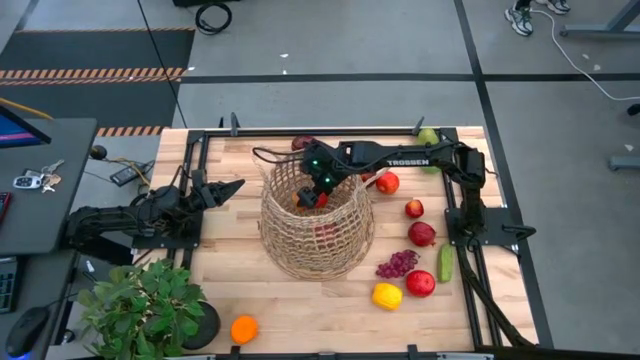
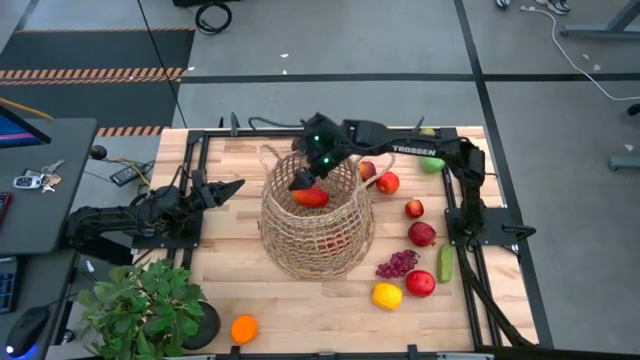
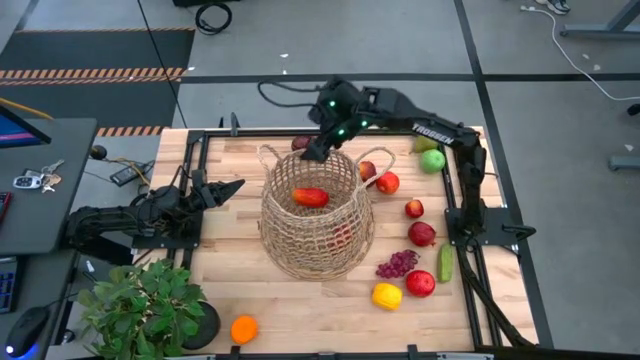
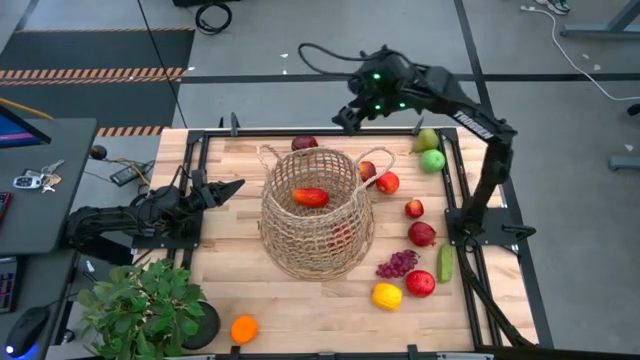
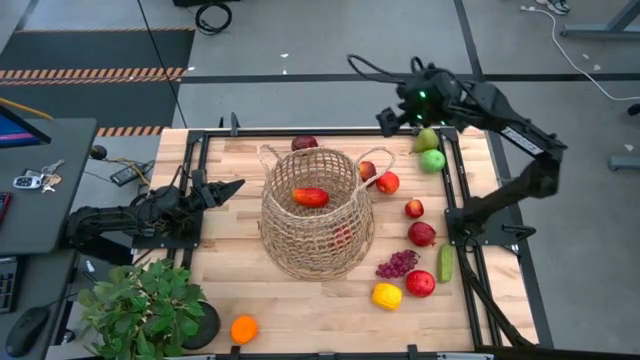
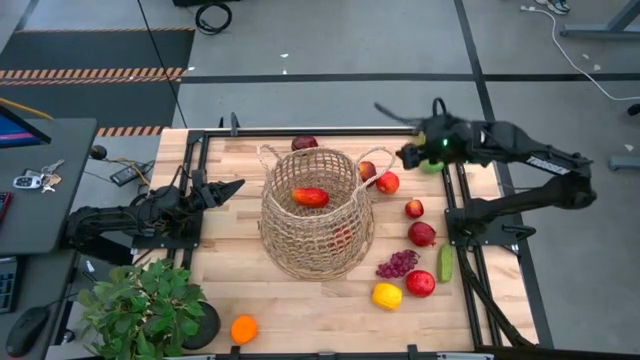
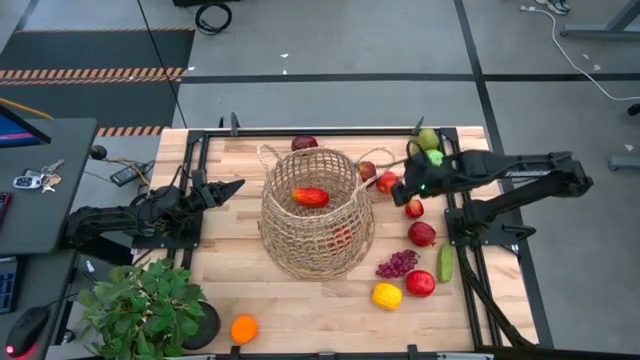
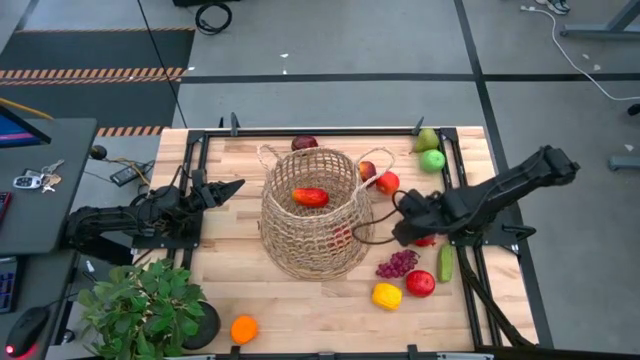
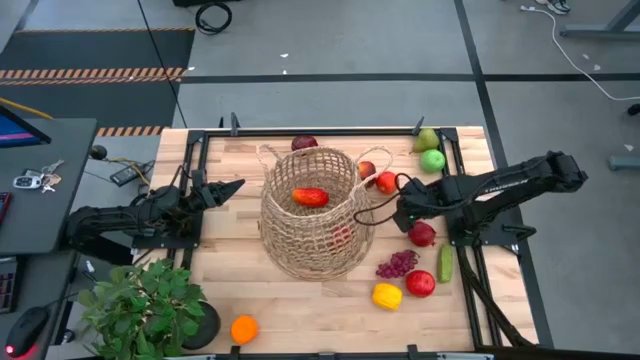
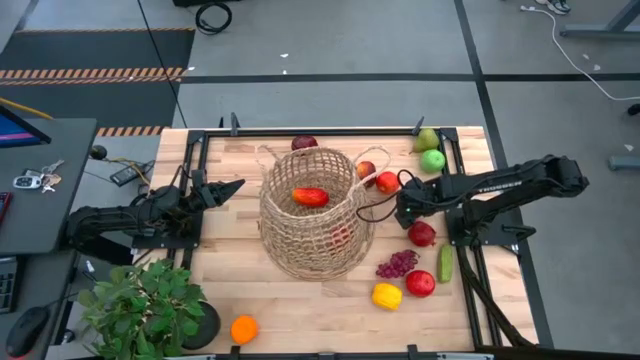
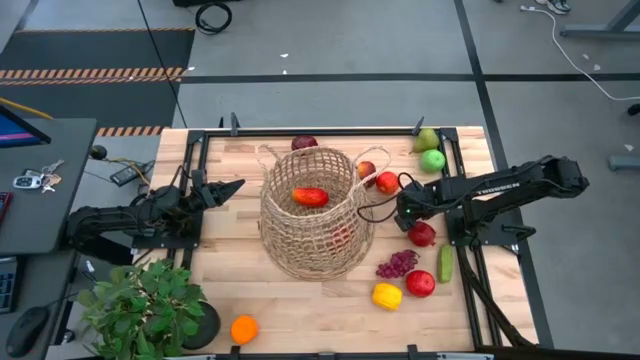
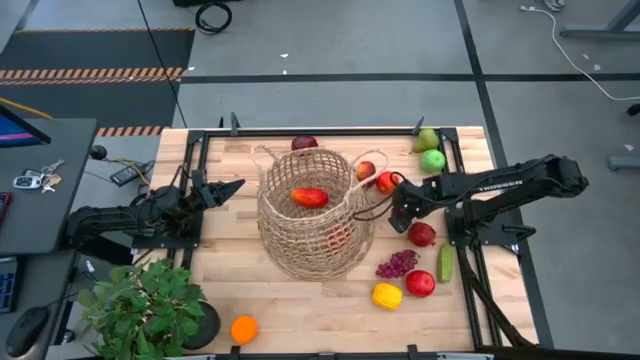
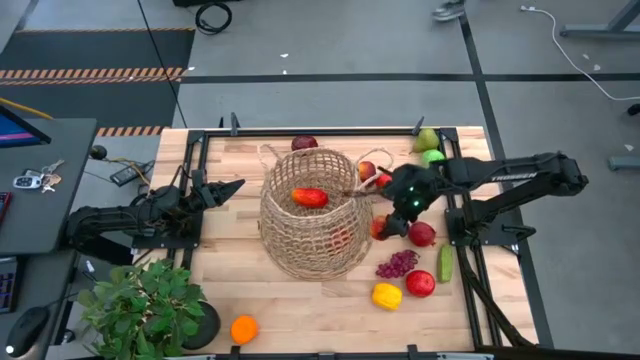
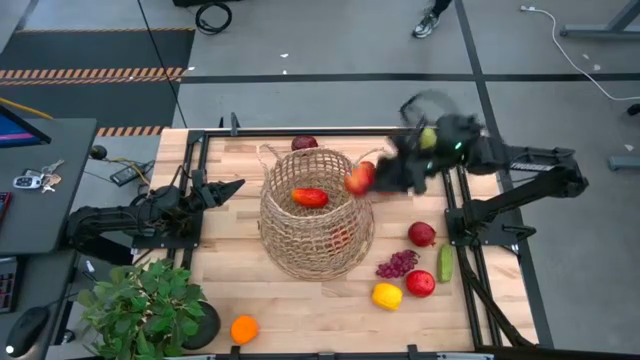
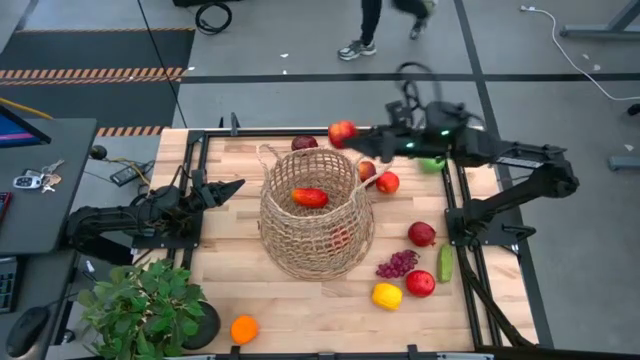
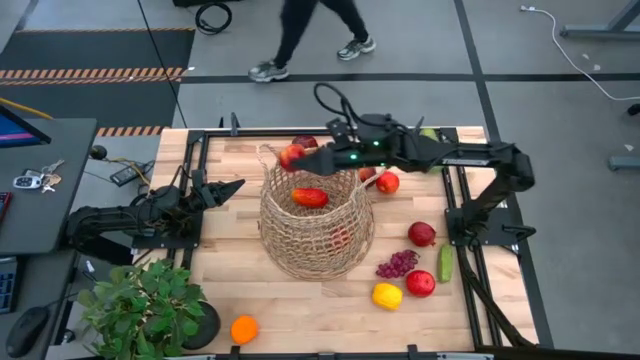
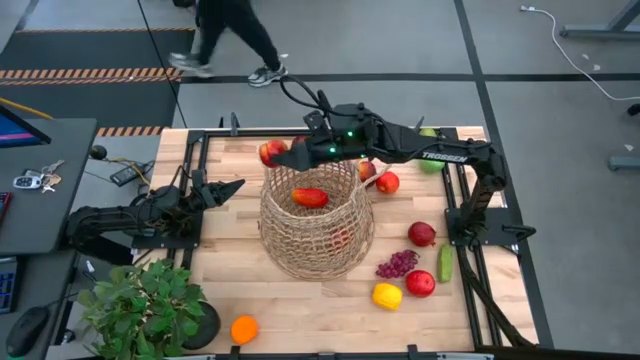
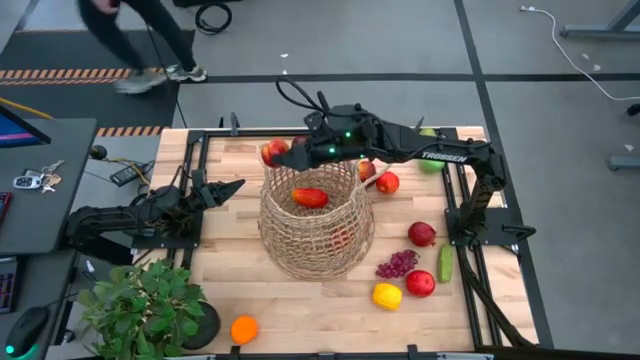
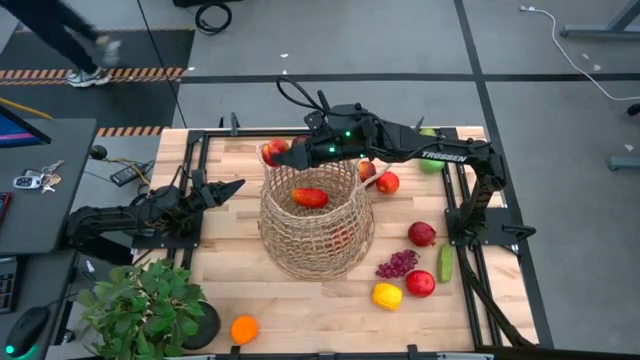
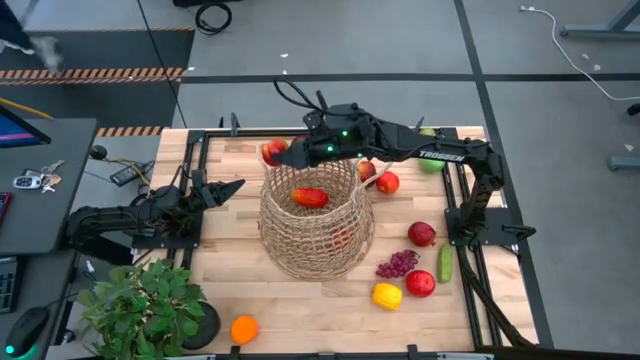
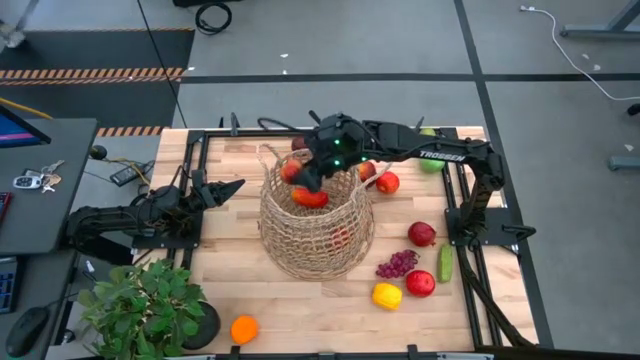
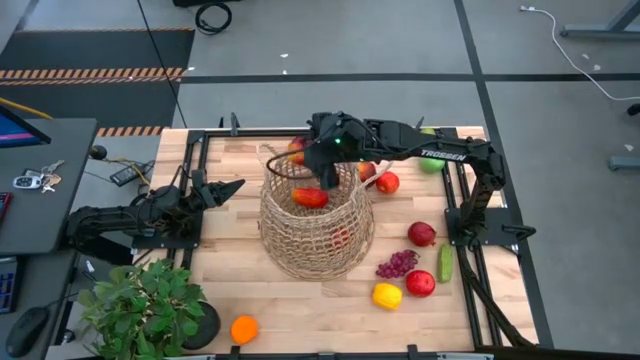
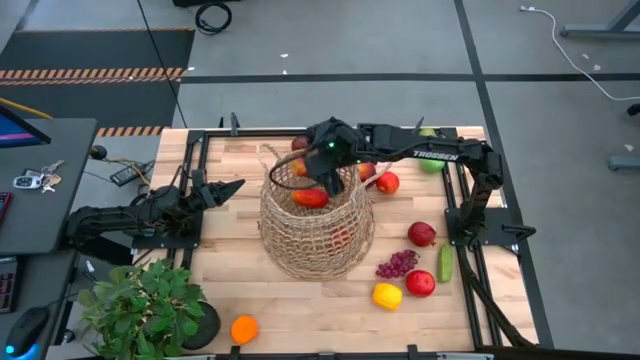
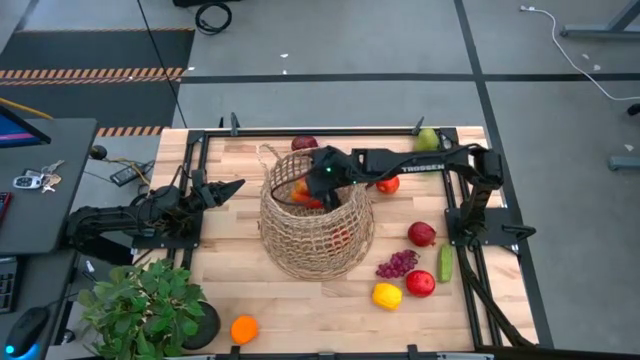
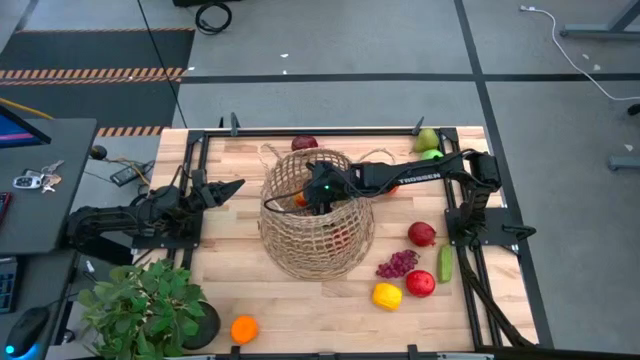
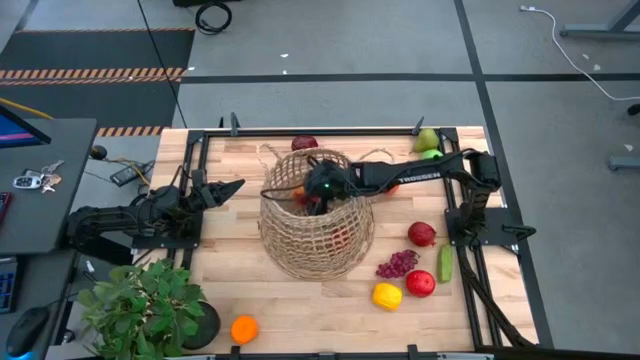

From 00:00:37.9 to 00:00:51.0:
Task: Build produce basket
Put the red apple into the basket

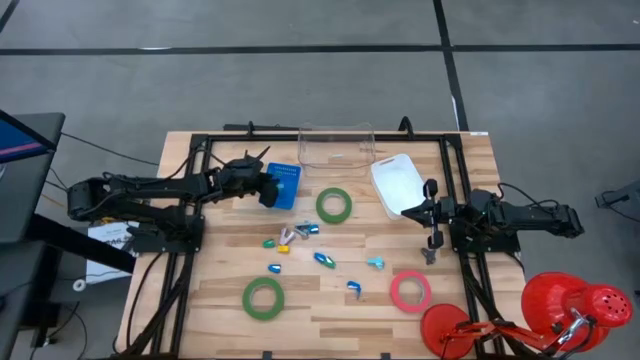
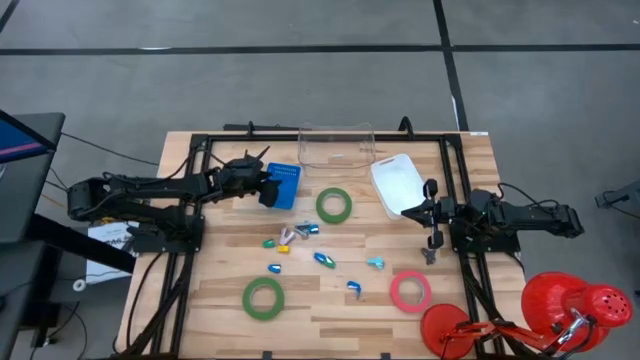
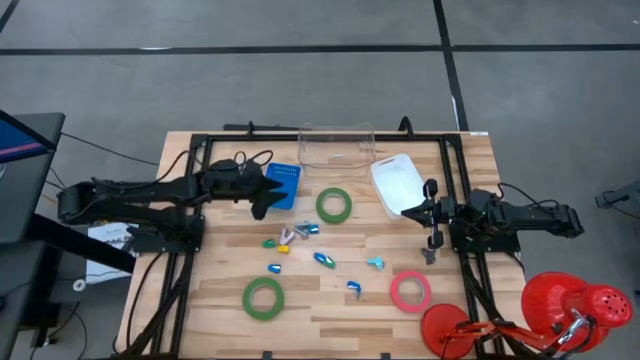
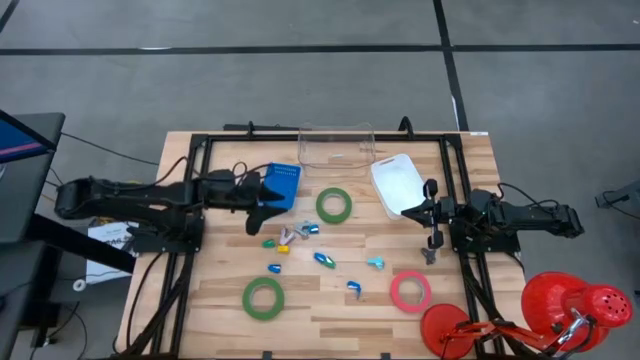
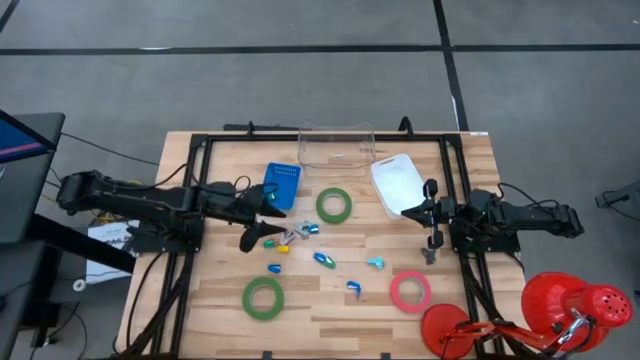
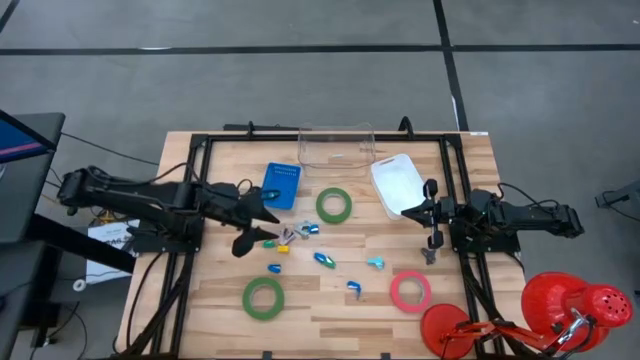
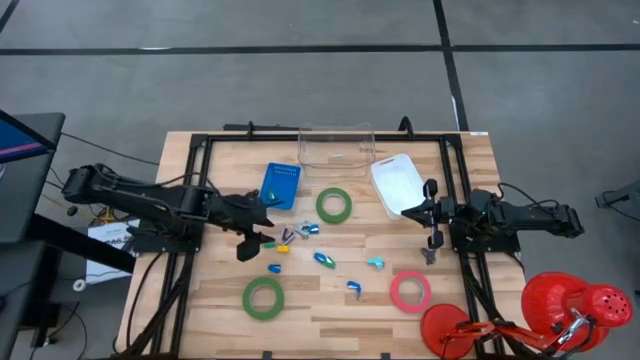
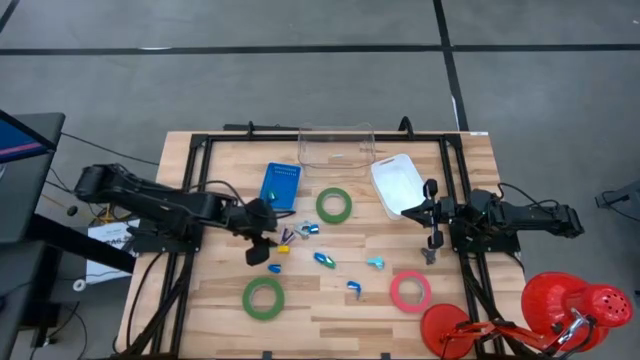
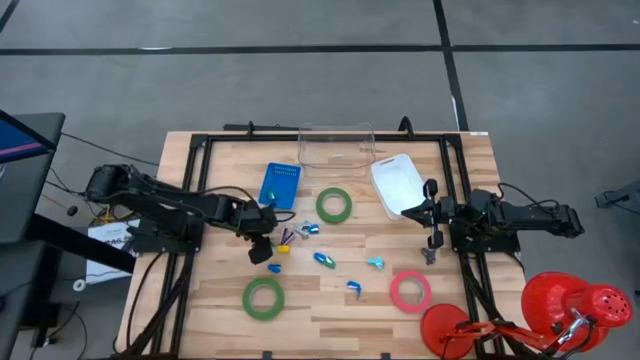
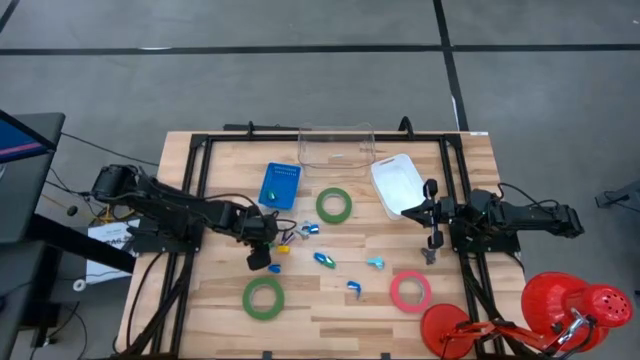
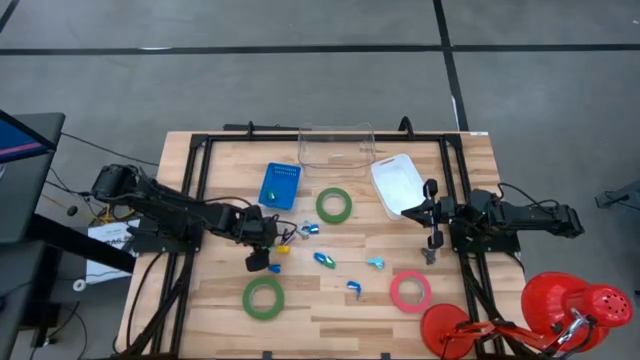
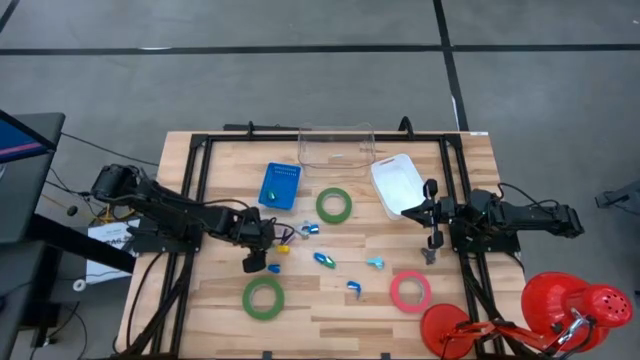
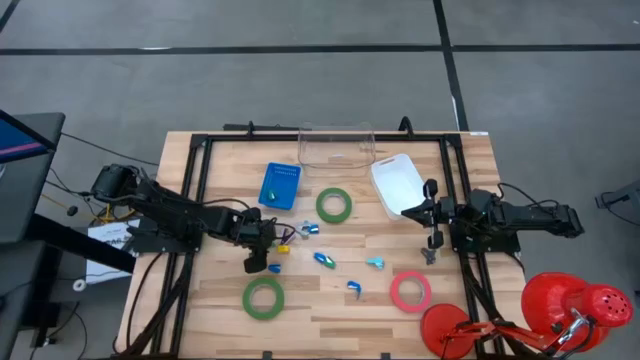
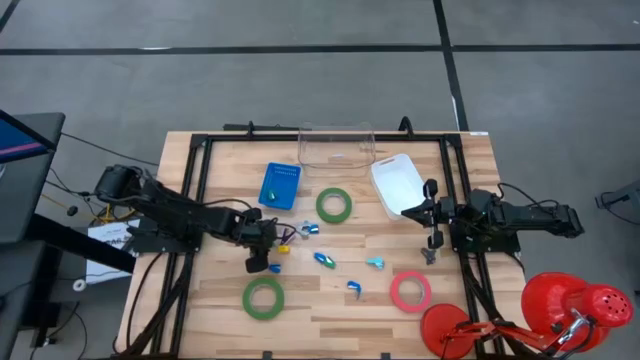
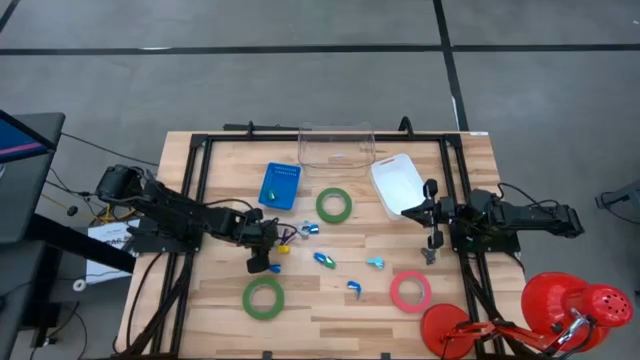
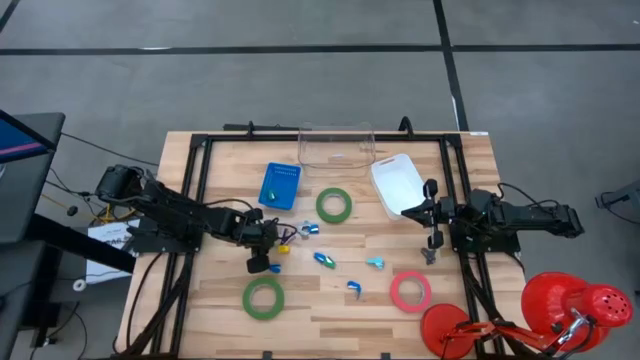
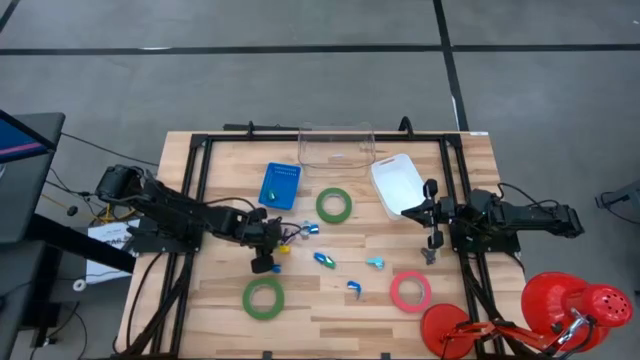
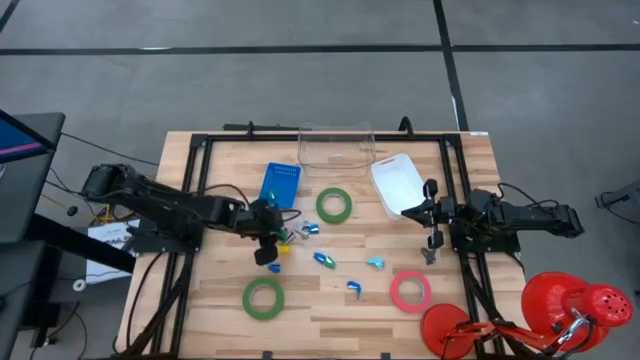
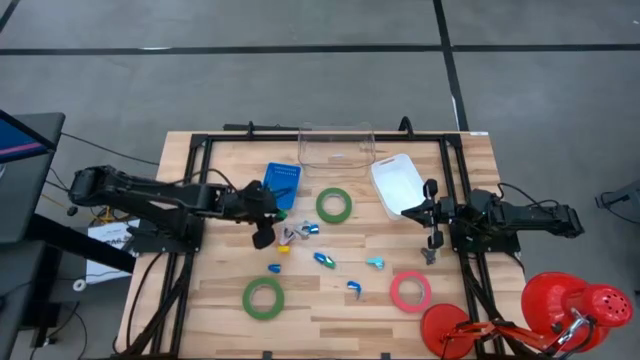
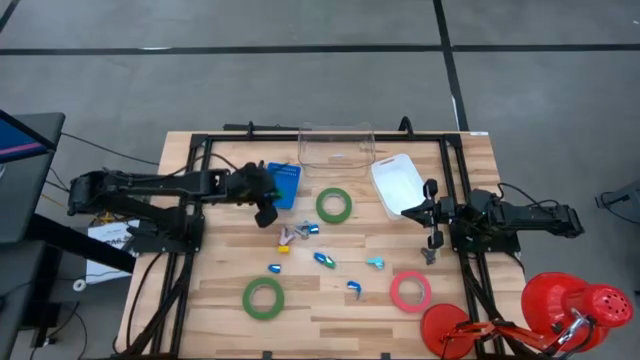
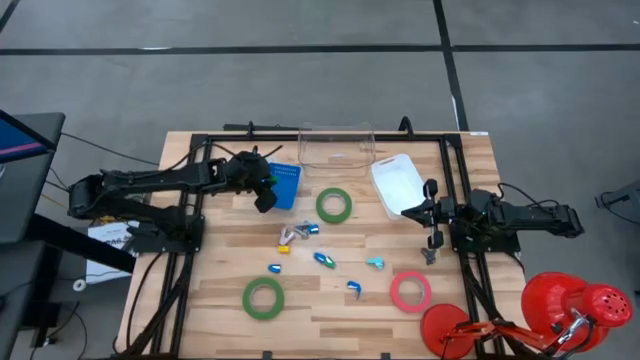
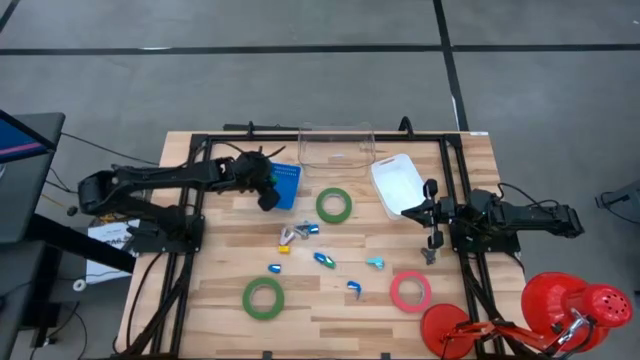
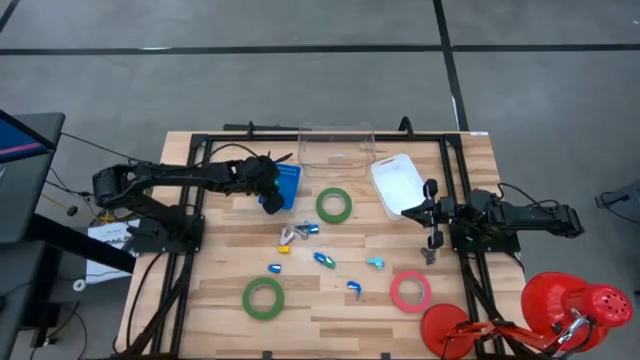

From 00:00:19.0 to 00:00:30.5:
Task: Pick and place Stapler, Stapler remover, tape
Put the top green stapler into the blue bin
